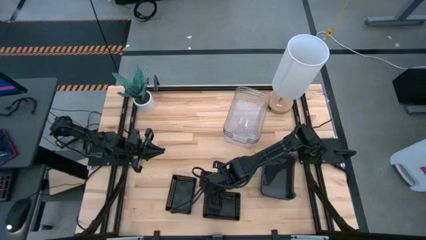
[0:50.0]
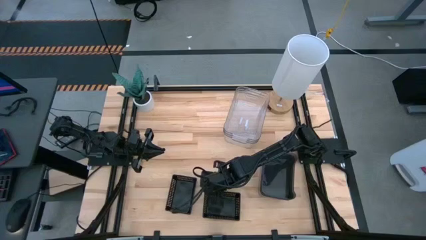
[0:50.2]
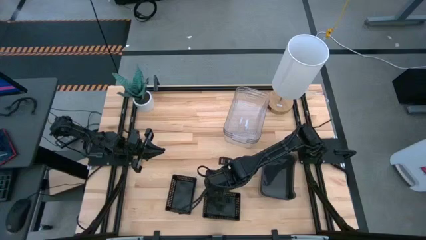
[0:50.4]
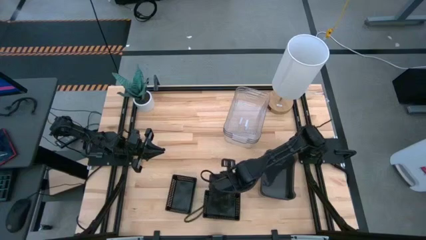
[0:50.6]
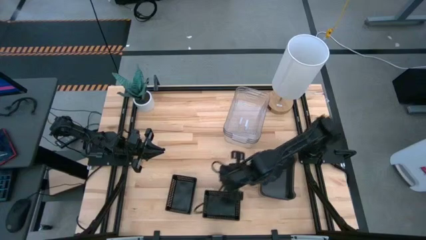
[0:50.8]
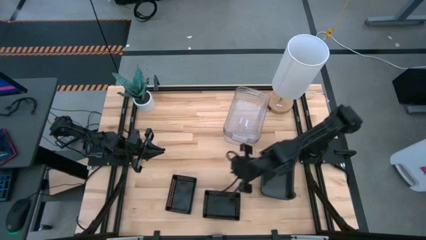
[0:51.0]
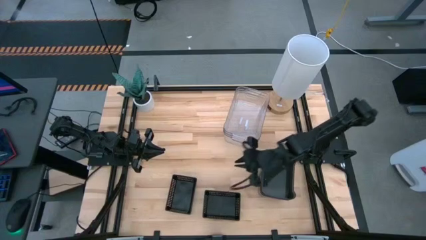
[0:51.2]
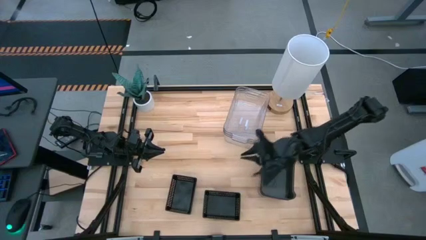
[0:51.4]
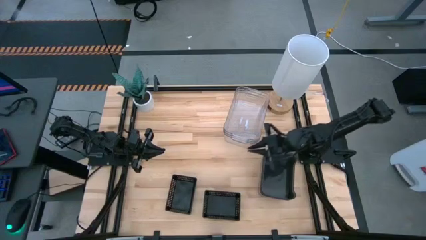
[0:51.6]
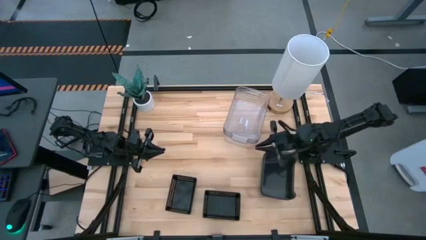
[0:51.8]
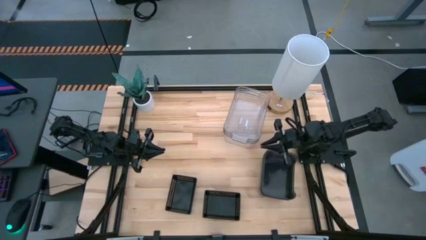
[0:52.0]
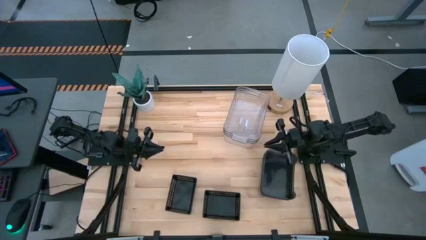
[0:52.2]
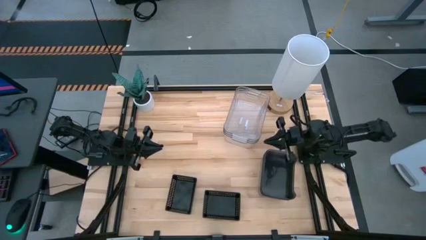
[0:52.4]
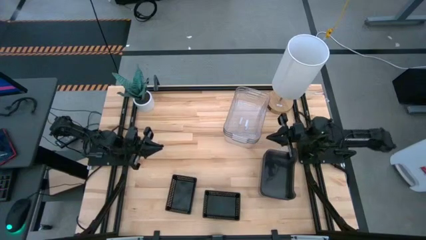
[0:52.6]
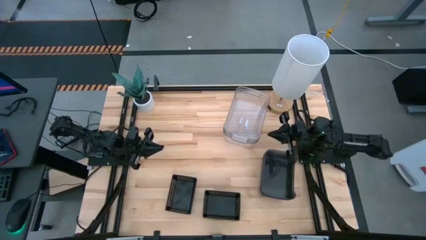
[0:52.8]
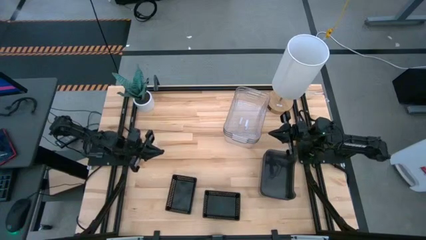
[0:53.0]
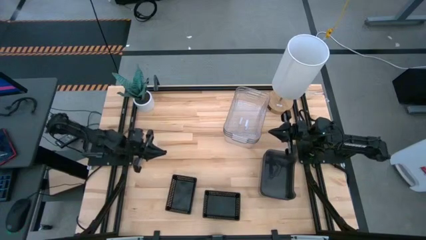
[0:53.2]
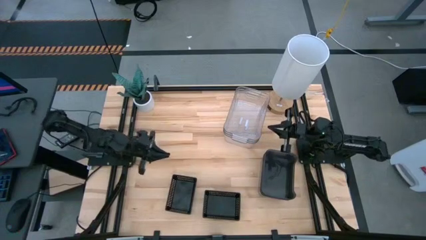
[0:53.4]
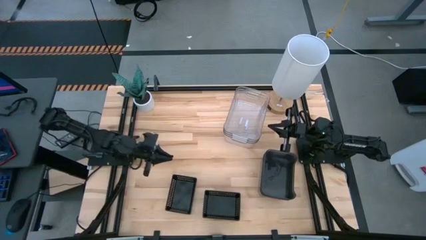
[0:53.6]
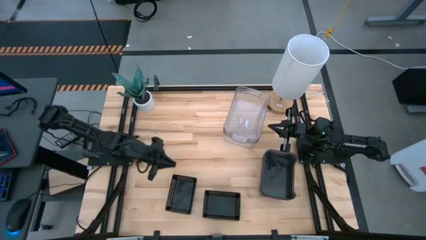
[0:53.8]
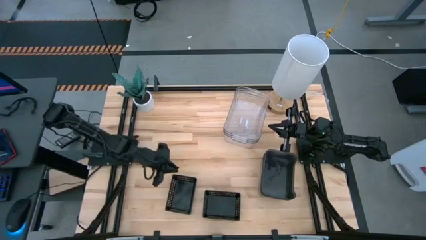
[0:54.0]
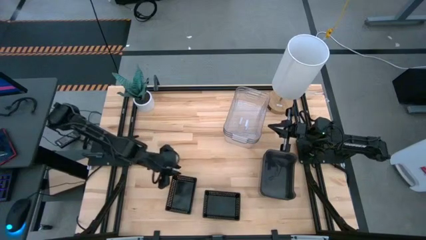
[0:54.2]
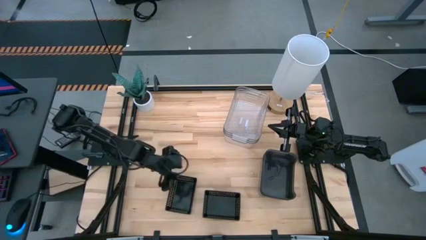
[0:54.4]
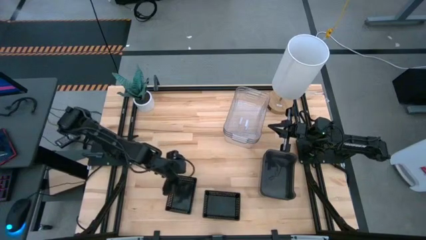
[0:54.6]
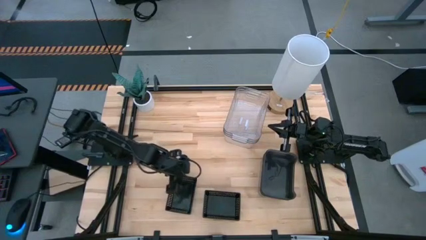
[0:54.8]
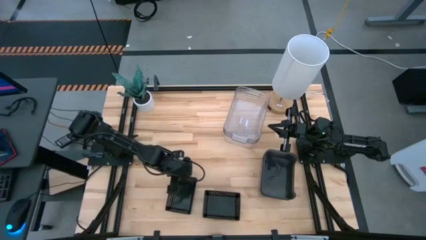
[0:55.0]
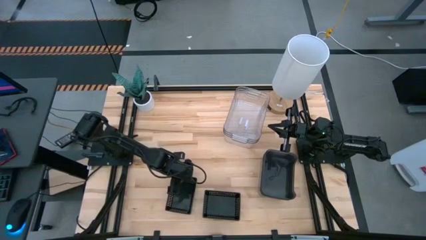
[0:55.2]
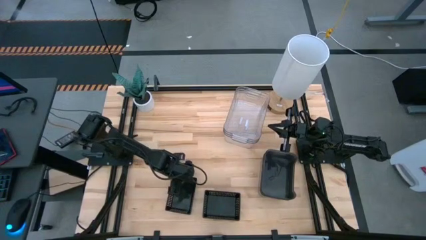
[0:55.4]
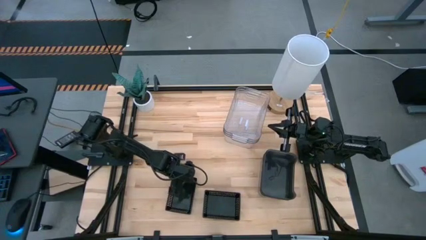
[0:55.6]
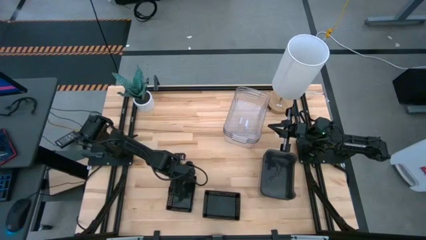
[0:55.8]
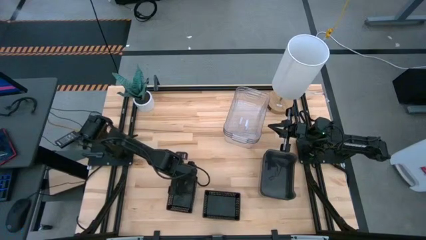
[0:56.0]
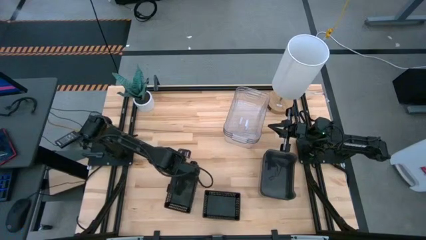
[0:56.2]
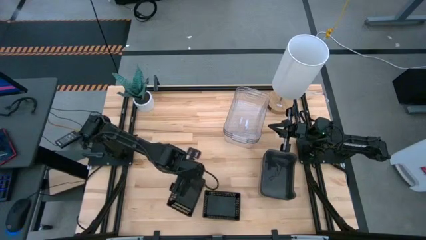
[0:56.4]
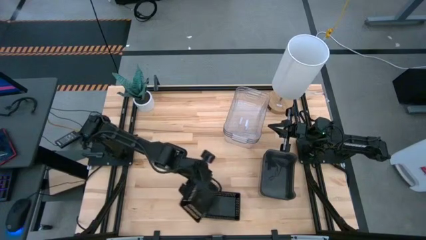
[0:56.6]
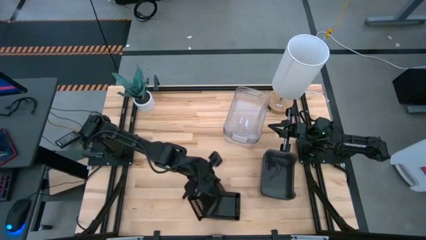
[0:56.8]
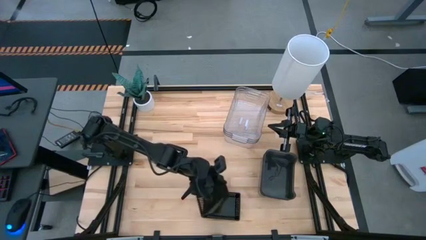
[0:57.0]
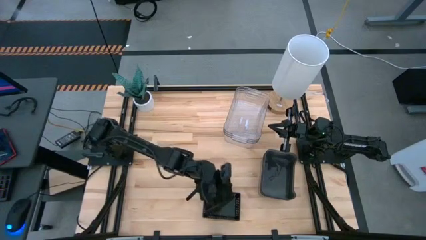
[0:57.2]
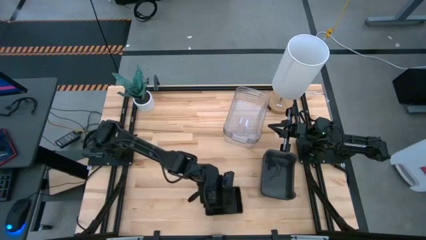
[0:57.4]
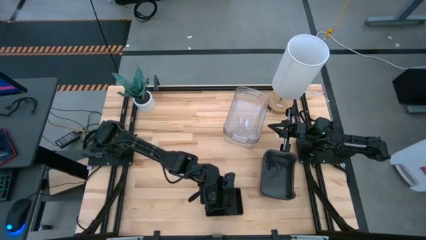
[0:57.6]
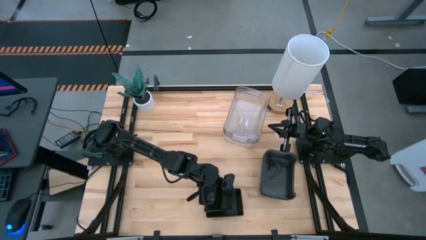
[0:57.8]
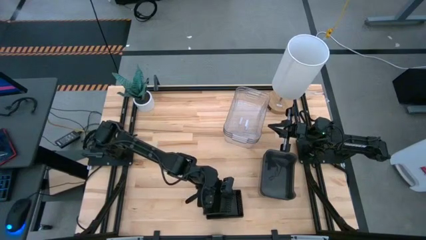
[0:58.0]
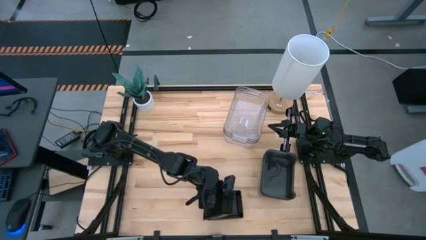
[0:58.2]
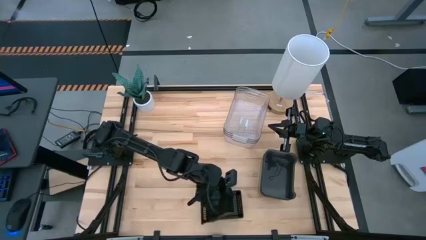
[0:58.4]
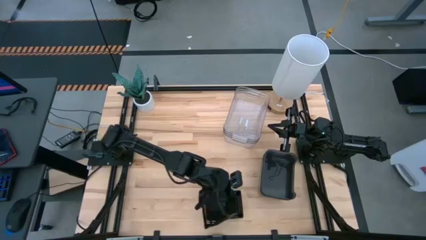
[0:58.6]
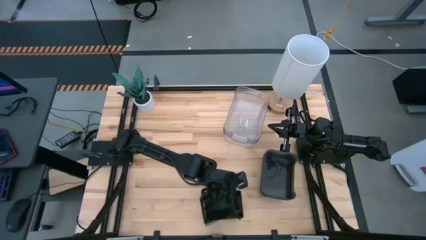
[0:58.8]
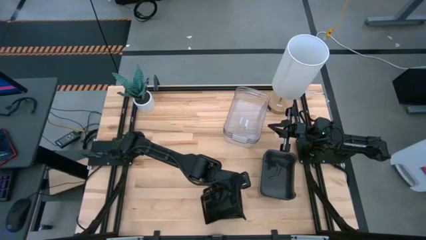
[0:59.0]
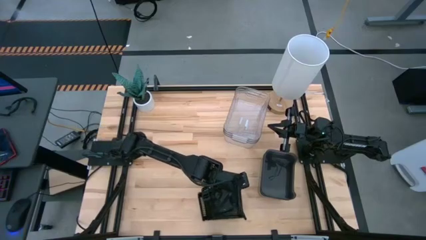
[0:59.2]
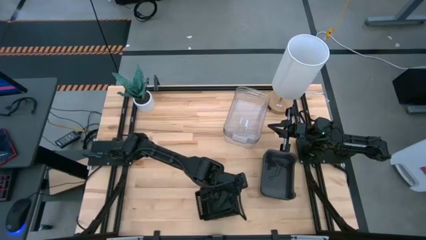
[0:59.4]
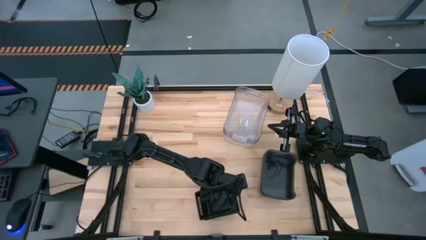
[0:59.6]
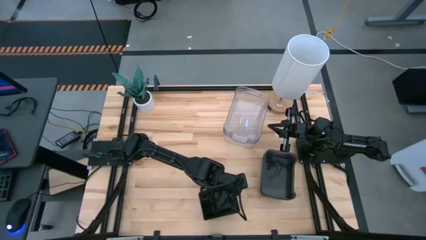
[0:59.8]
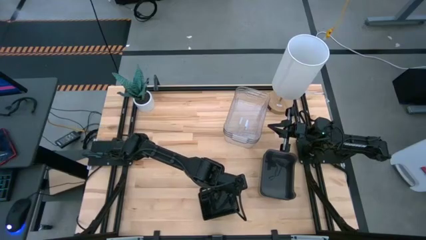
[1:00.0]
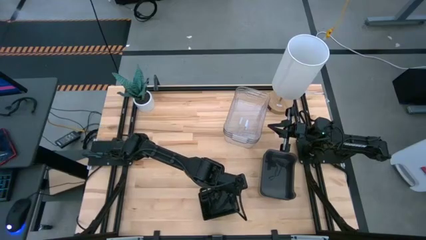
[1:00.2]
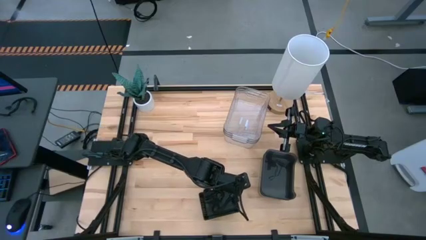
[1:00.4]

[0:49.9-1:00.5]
Stack the left black basket on top of the right black basket

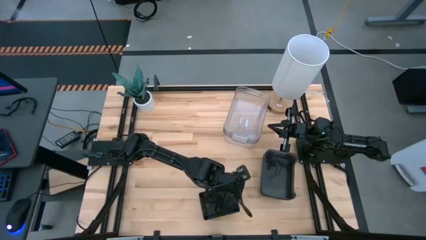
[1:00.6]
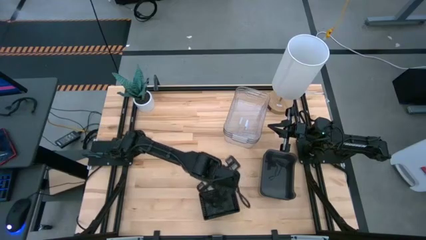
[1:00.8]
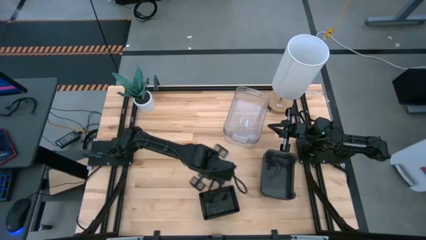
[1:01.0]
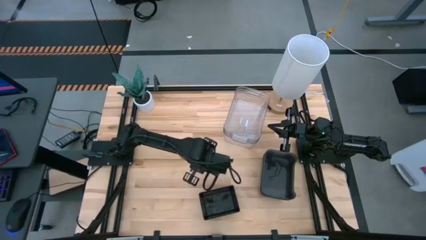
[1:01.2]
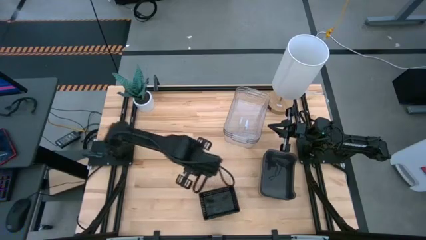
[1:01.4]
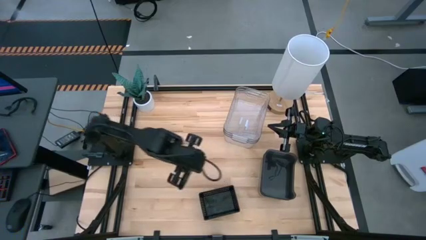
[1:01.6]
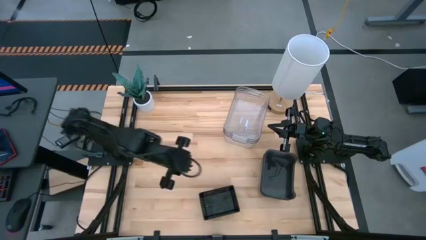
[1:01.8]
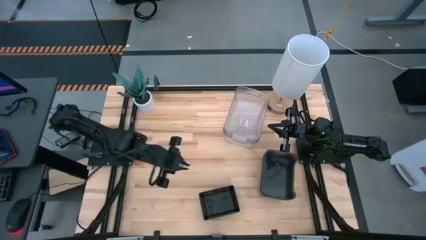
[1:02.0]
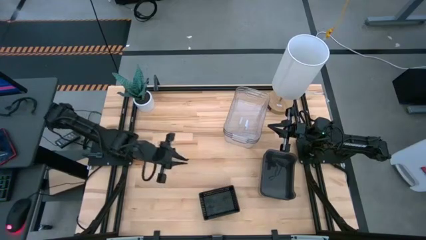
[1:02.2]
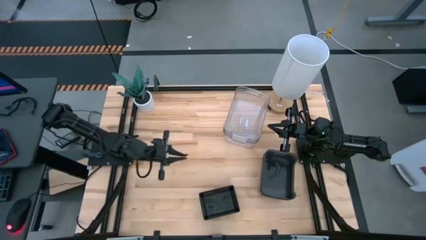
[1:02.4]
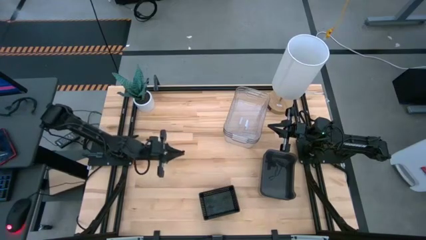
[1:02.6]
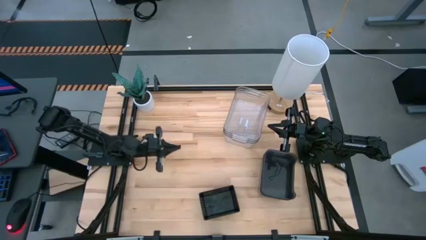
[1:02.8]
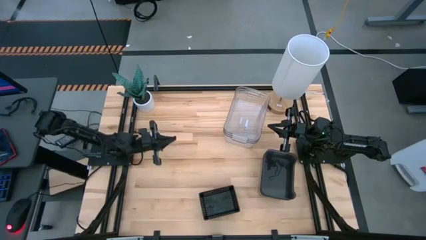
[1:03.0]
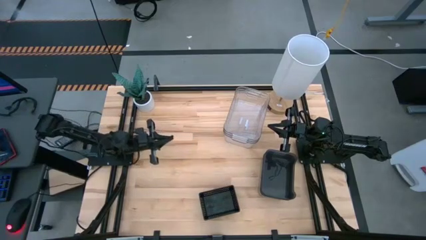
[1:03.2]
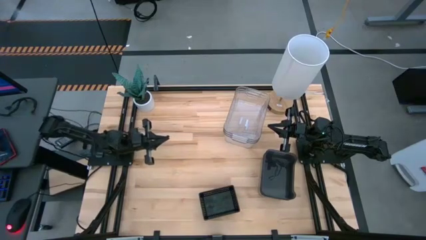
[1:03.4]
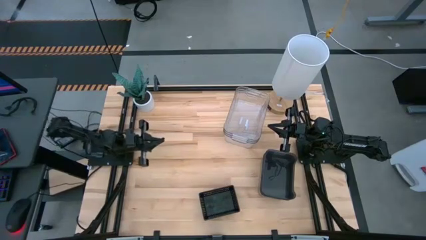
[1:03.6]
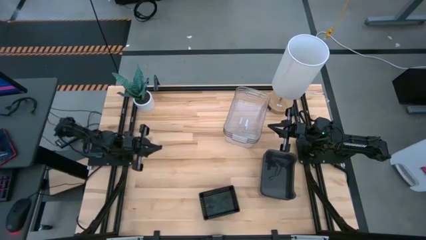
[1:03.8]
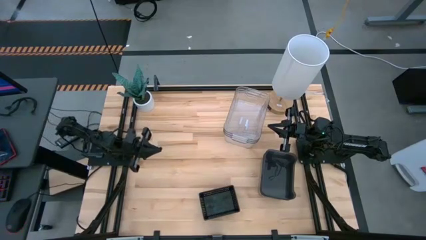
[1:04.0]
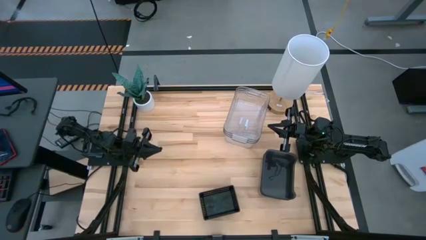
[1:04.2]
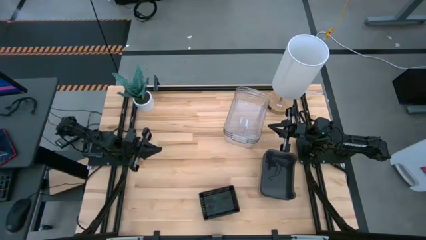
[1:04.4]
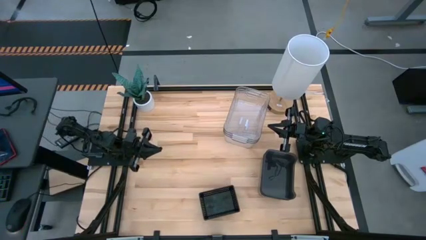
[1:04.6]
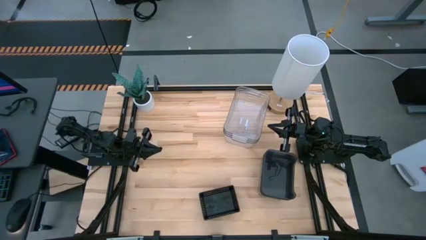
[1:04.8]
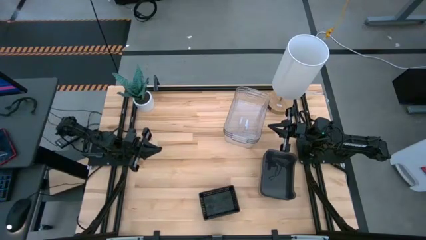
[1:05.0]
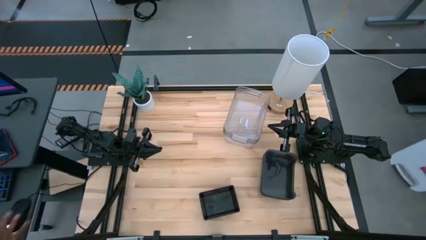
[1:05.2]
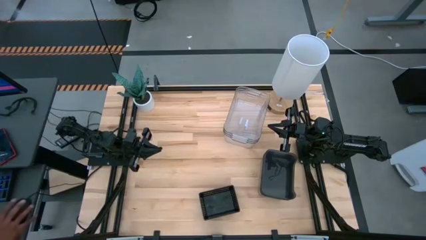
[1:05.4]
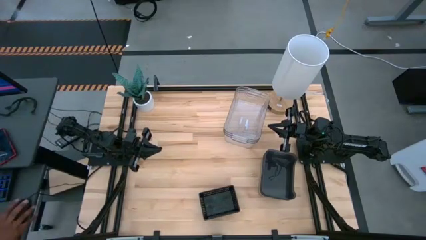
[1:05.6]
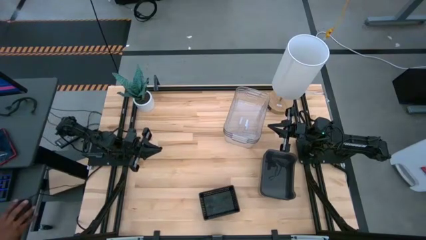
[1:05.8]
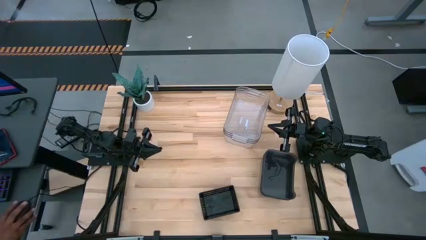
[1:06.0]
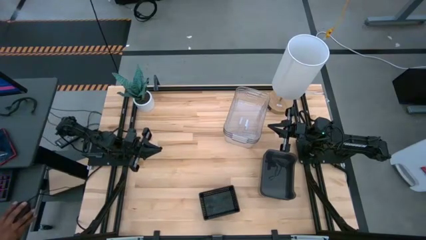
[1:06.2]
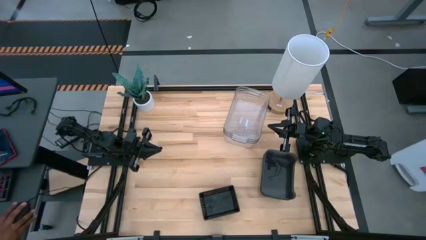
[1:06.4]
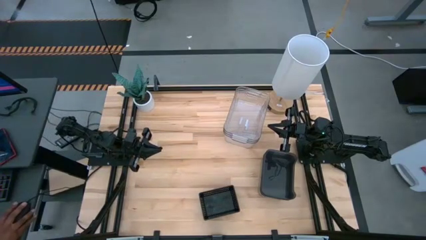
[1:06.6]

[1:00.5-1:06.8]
Return to home position
